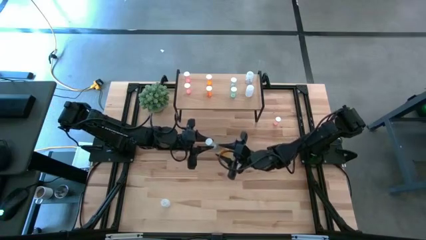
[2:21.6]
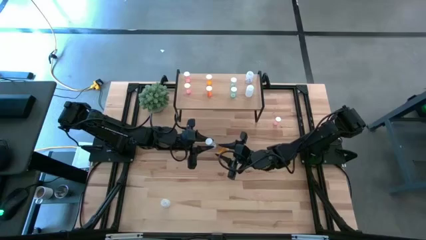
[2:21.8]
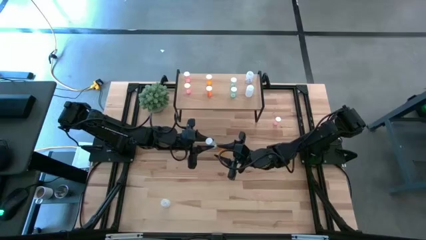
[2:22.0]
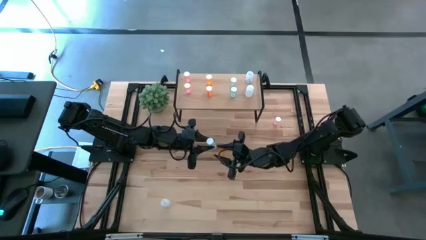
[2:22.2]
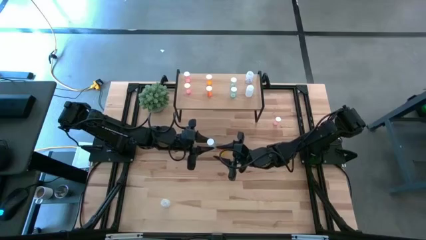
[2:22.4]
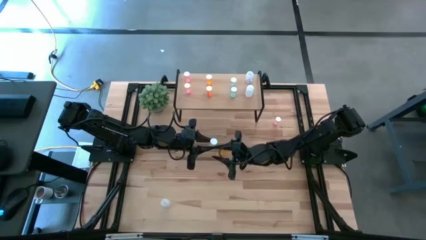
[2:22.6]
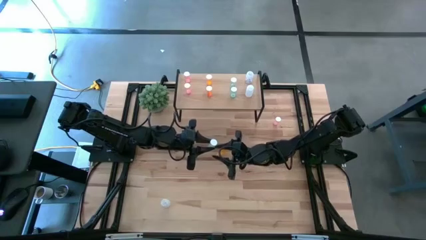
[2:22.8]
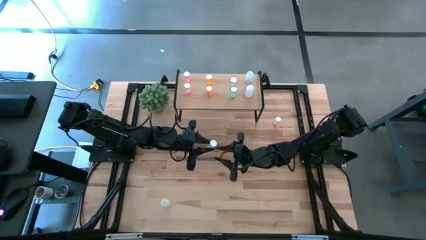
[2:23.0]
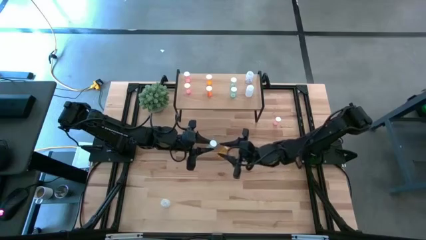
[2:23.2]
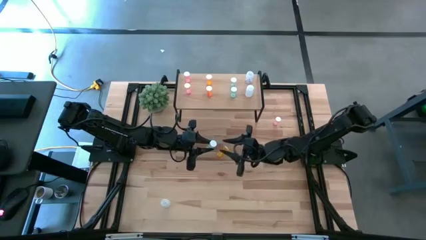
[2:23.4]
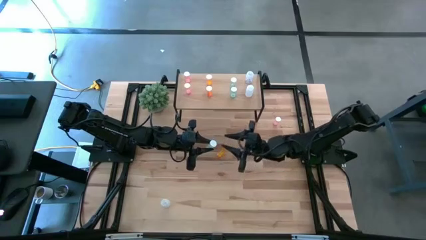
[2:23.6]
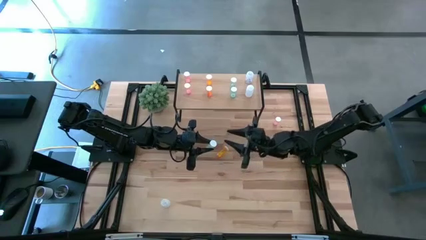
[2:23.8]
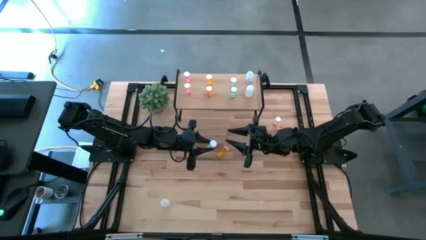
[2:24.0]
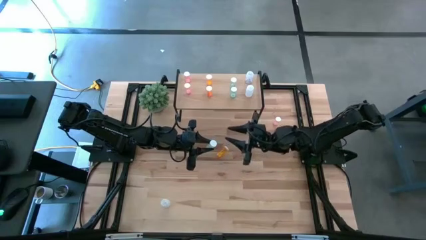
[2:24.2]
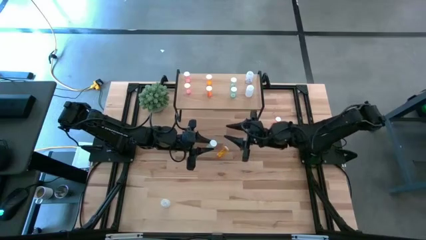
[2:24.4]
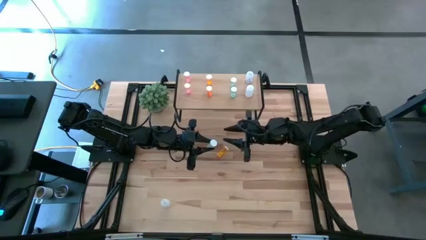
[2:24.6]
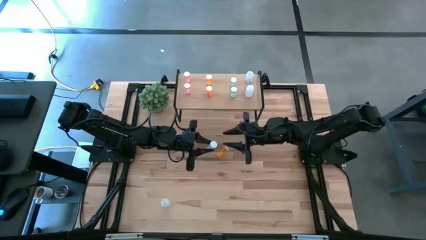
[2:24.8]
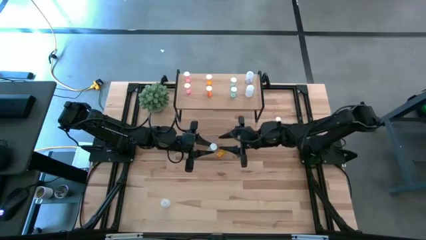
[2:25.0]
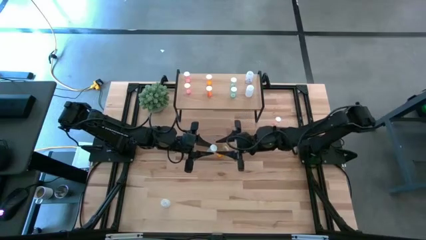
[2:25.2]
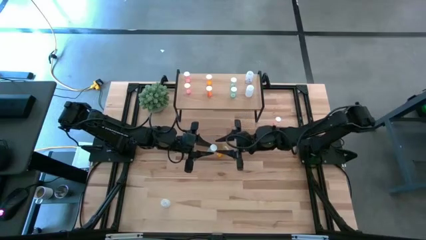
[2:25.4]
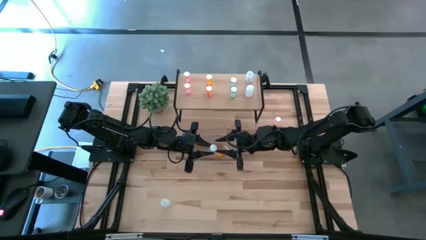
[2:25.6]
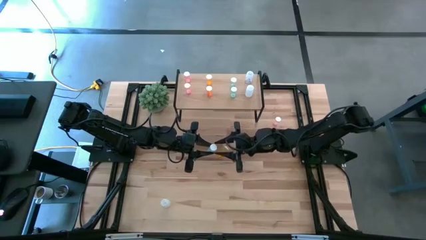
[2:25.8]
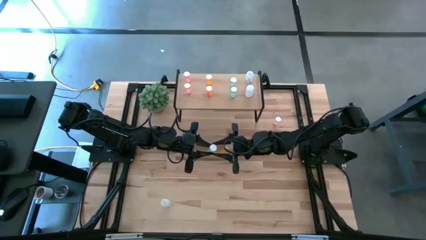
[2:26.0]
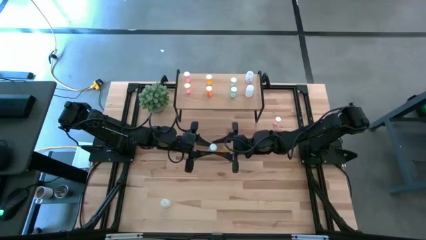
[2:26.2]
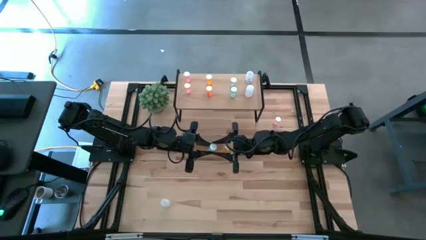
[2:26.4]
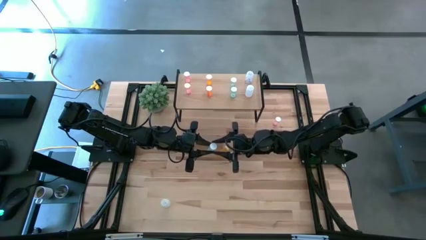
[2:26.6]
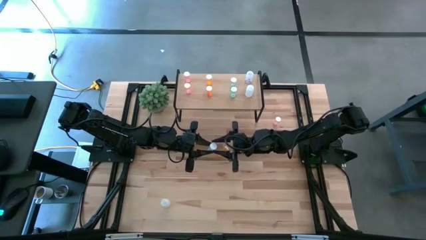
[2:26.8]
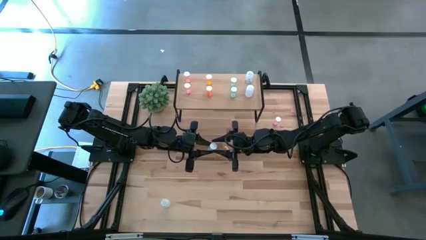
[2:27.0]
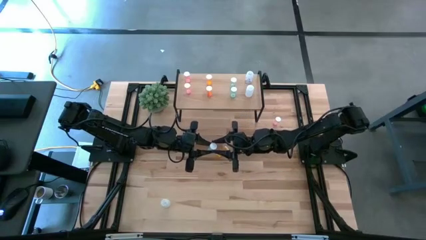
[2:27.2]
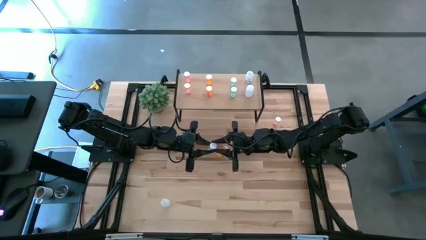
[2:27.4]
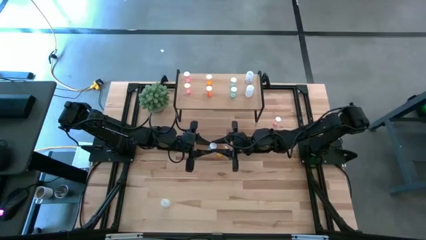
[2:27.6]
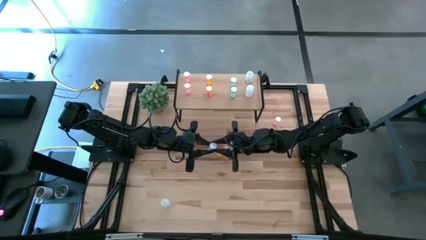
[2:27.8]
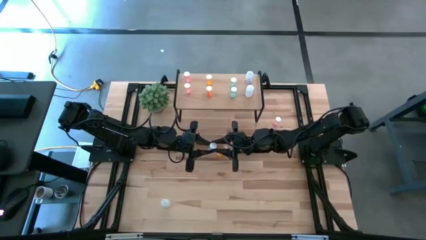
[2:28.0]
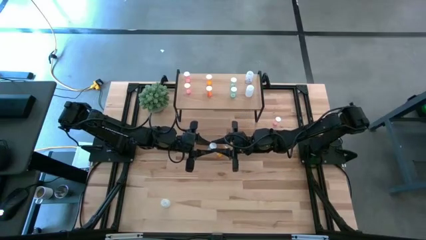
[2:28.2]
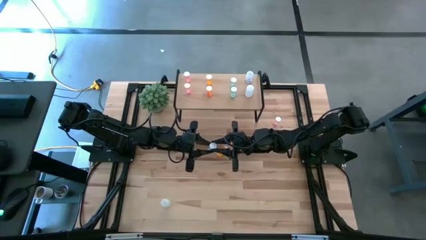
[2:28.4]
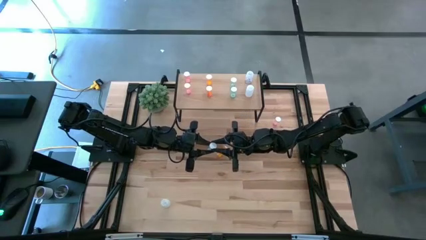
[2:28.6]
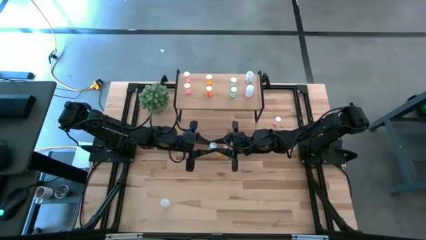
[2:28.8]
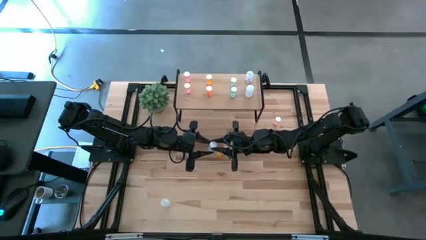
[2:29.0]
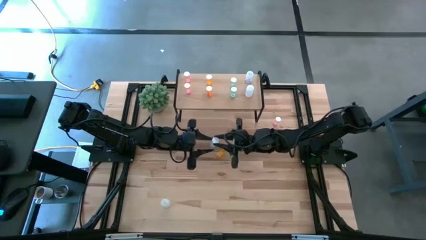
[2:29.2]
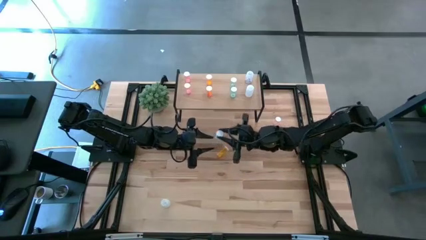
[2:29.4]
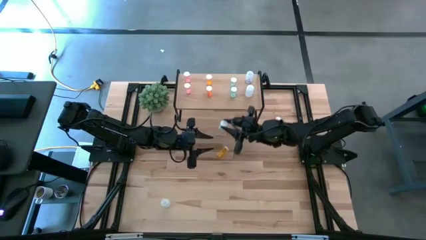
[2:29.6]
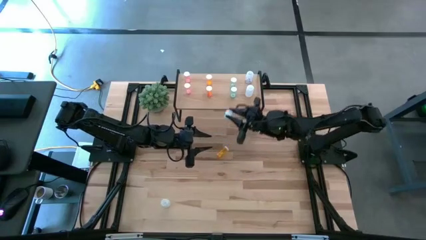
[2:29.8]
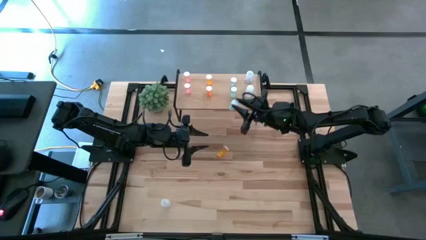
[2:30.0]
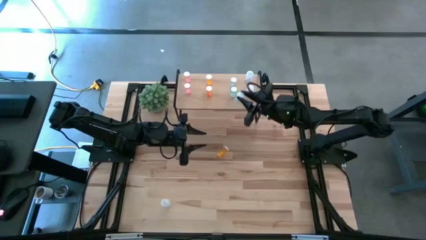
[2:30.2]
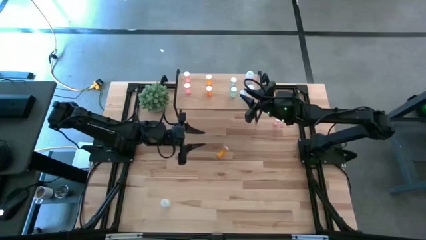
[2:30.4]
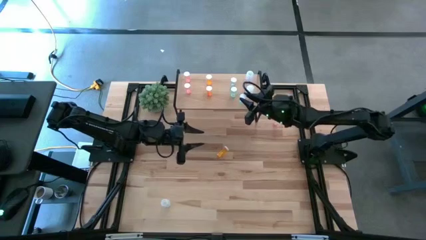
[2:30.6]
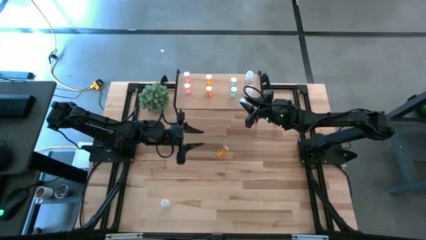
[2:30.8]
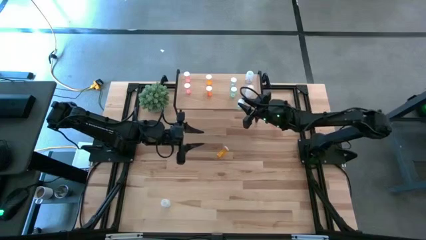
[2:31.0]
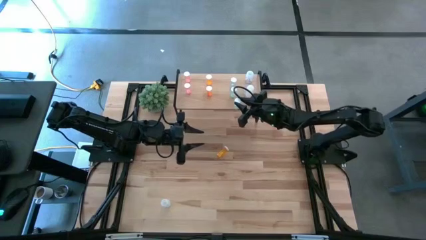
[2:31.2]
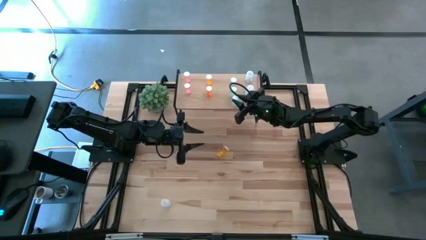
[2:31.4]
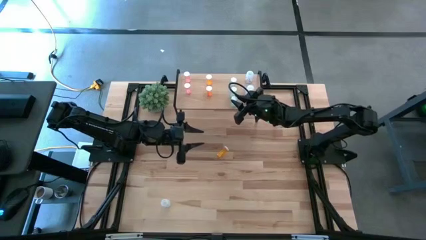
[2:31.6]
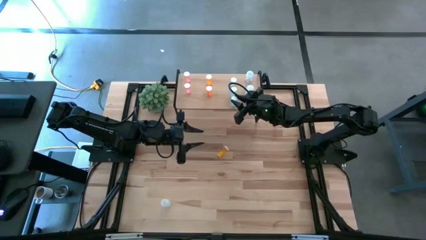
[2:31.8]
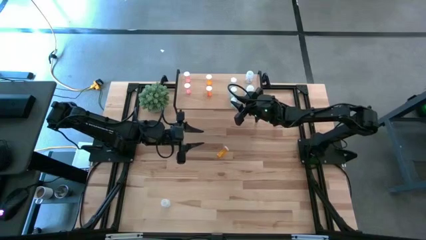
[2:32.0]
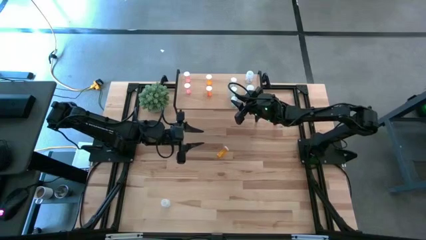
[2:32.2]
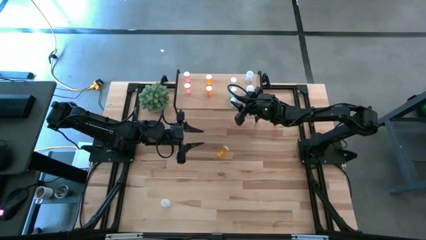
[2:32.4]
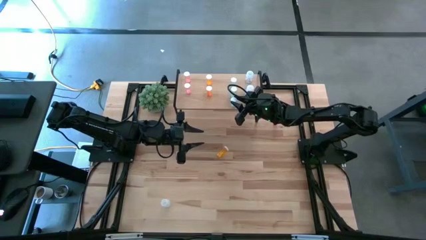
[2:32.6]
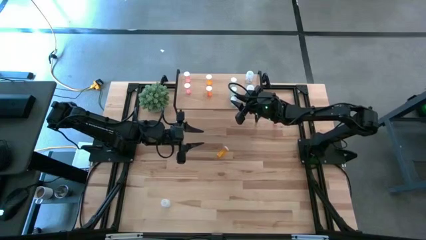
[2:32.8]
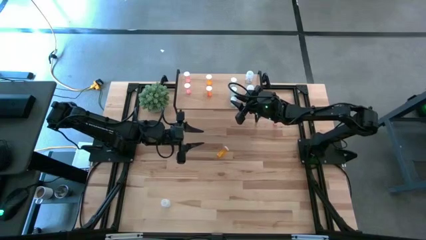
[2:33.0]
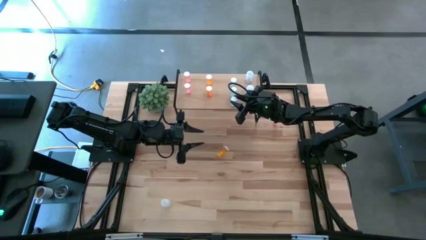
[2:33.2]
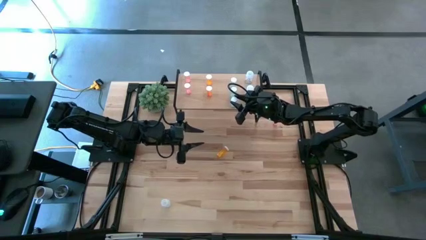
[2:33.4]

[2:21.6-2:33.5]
Task: Pick and place medicine bottles onto shelf by color
Put the blue pill bottle on the shelf aligned with the other blue pill bottles

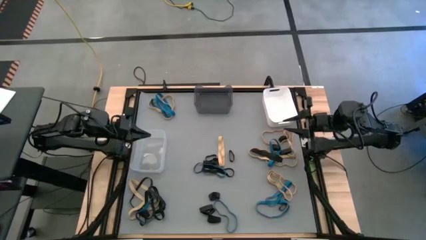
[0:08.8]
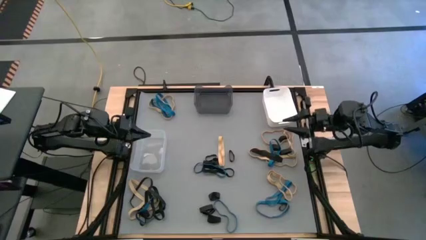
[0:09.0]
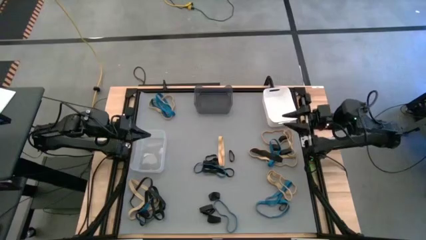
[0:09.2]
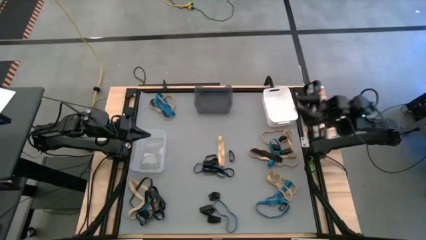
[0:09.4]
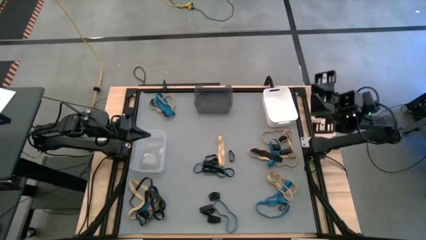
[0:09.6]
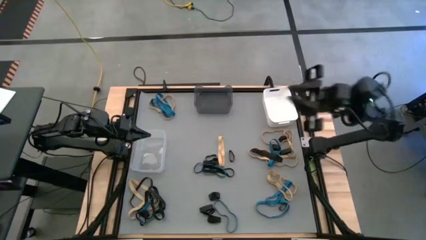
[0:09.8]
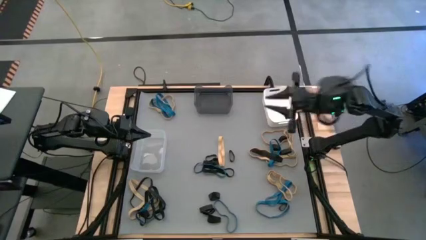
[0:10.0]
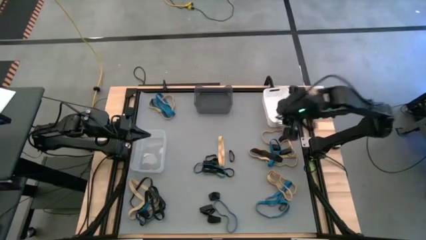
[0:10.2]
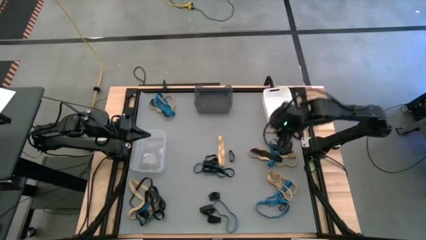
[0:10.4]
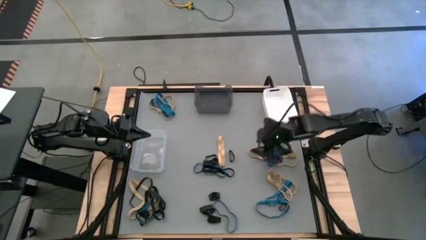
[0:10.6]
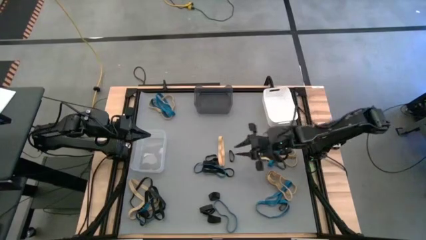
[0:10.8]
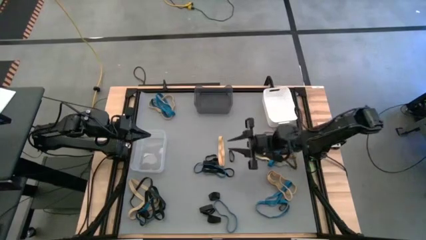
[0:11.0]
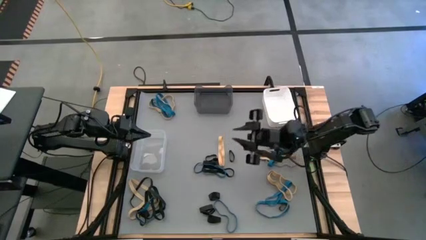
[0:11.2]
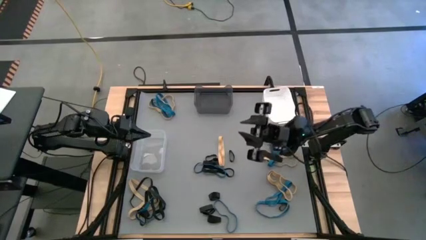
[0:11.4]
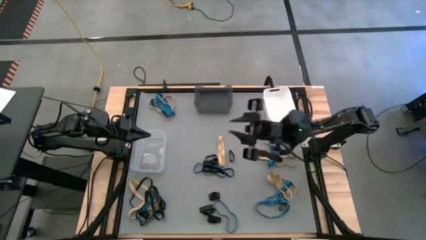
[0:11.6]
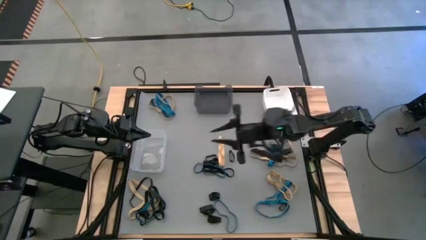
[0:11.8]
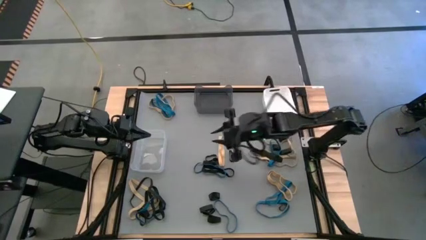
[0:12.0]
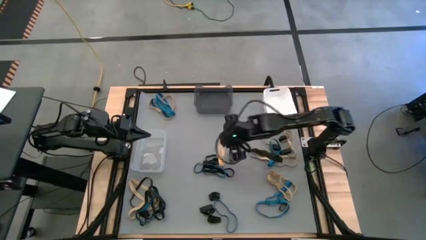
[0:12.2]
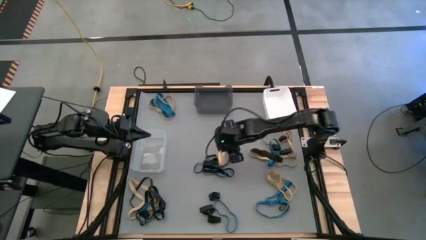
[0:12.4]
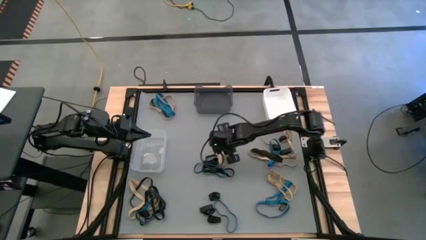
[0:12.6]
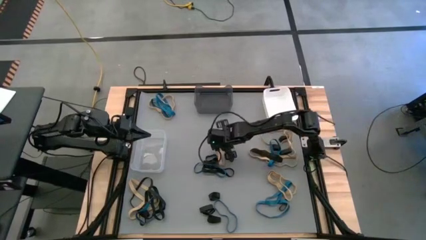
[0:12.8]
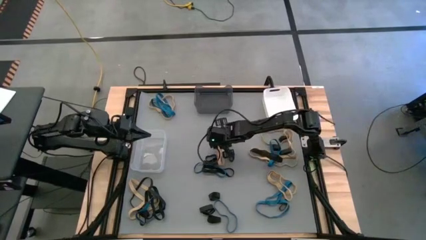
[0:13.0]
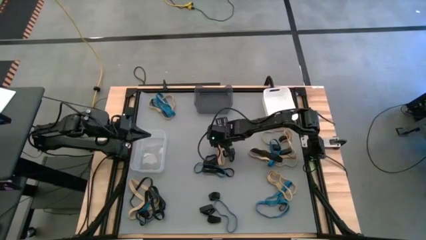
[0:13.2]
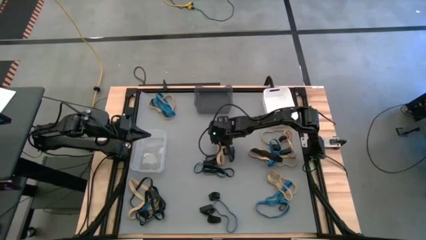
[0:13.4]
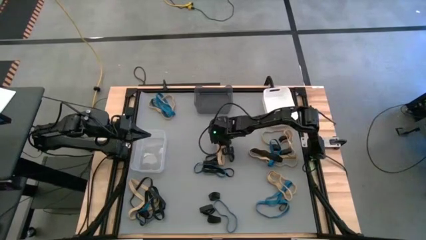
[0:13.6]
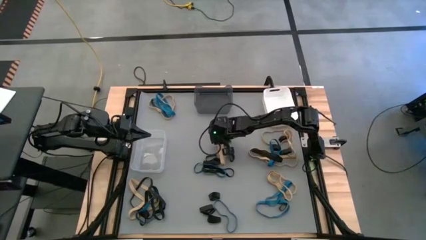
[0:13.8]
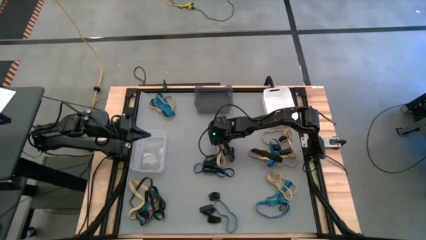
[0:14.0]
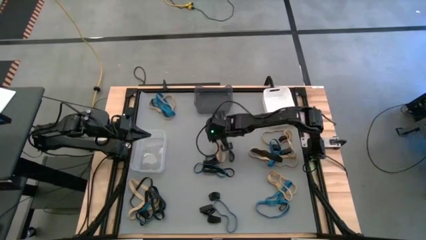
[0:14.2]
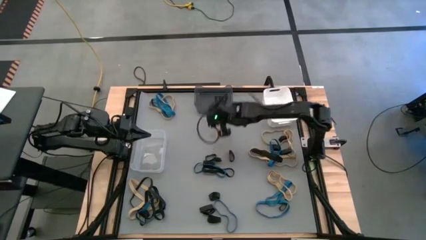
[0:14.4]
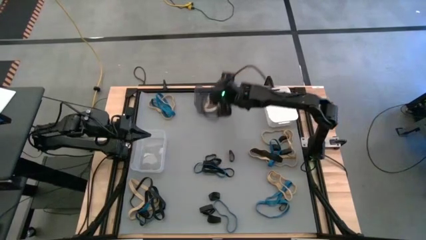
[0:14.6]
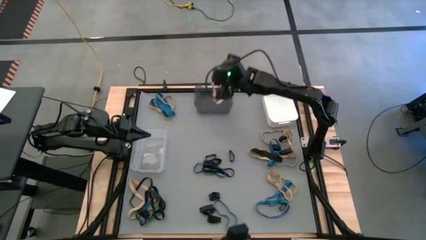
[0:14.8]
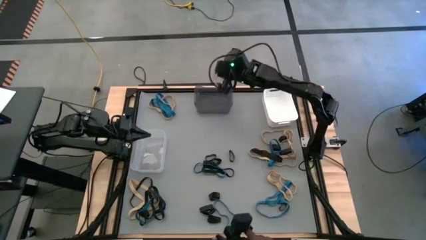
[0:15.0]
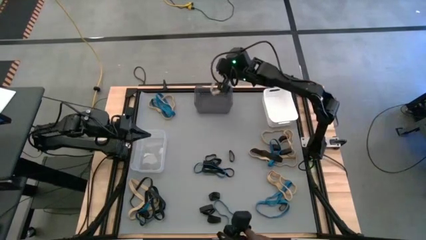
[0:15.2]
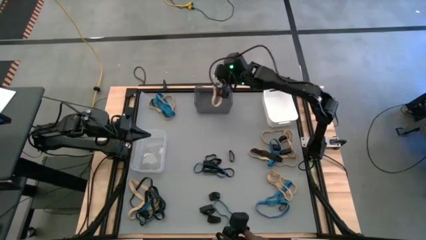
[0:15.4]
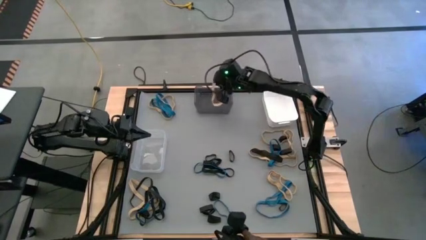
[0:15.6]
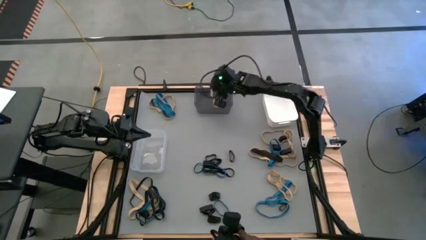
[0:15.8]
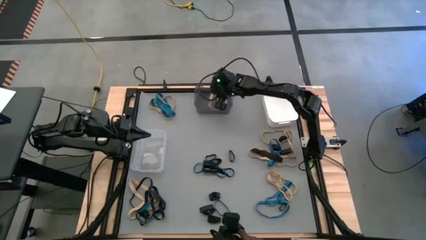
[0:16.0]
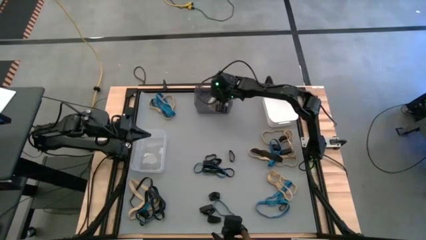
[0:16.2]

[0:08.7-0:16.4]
Task: Sort rubber bands into baskets
Put the brown rubber band into the black bin
